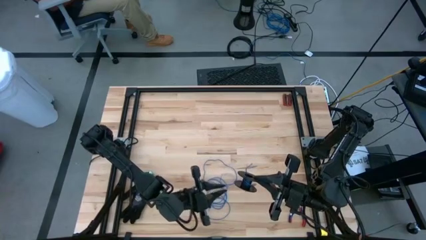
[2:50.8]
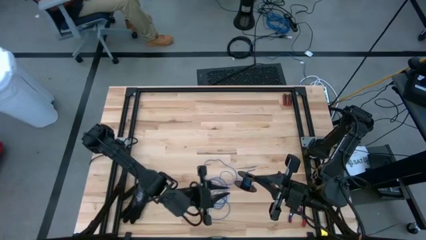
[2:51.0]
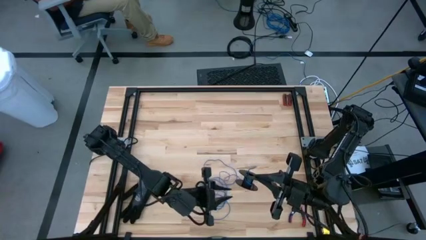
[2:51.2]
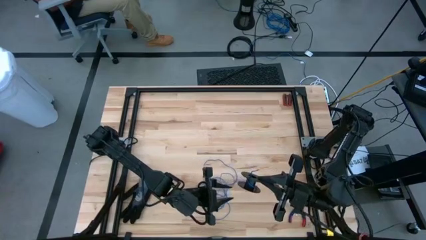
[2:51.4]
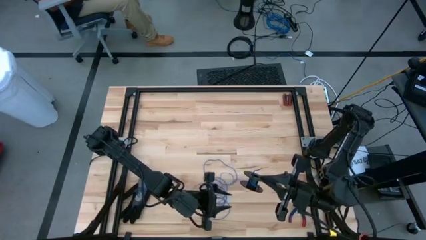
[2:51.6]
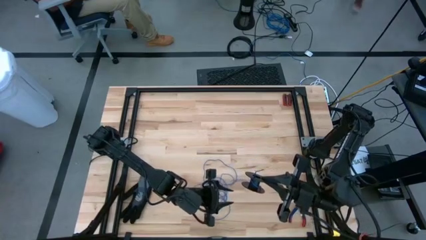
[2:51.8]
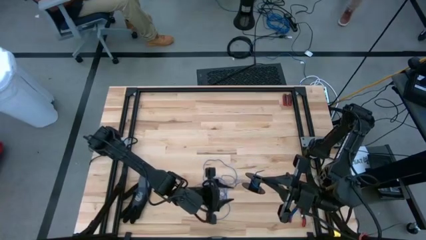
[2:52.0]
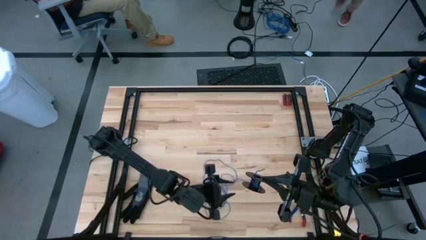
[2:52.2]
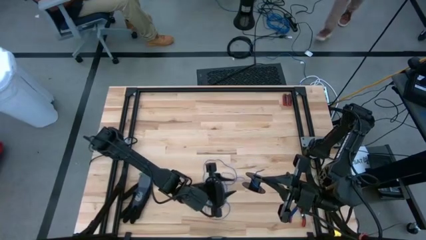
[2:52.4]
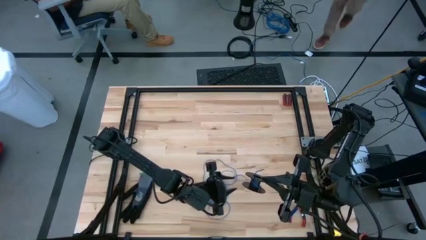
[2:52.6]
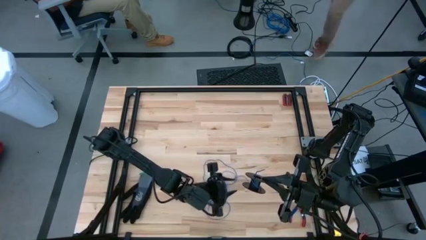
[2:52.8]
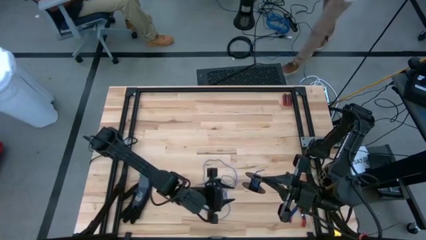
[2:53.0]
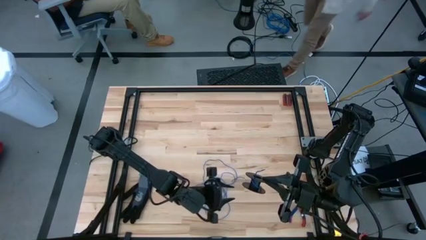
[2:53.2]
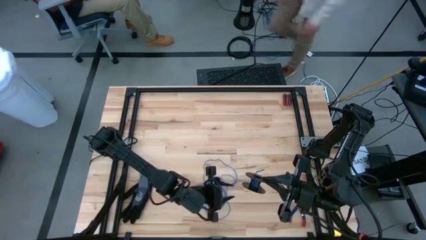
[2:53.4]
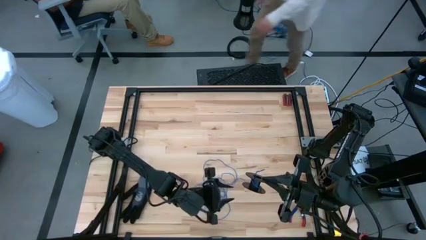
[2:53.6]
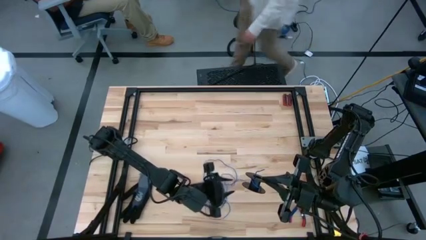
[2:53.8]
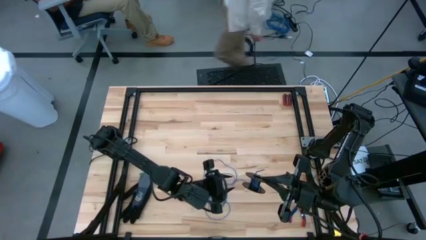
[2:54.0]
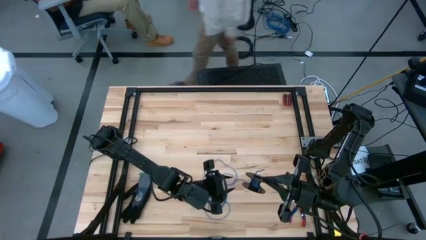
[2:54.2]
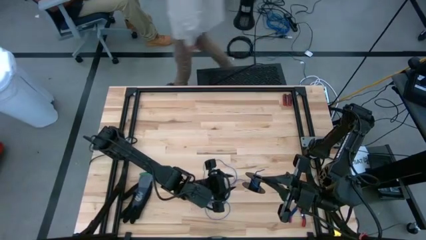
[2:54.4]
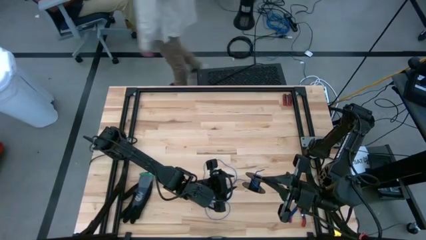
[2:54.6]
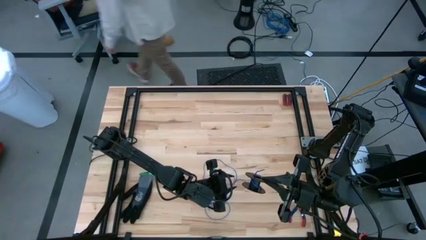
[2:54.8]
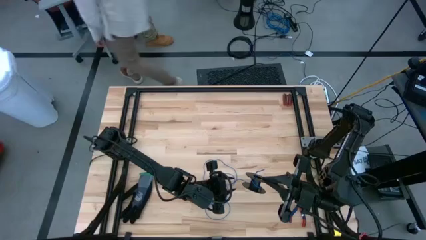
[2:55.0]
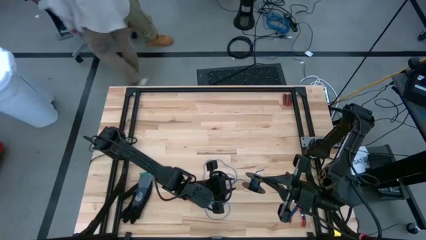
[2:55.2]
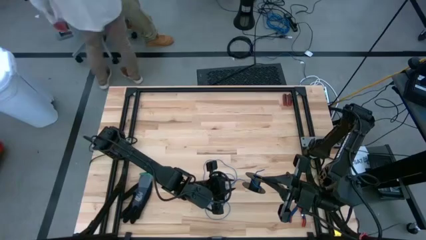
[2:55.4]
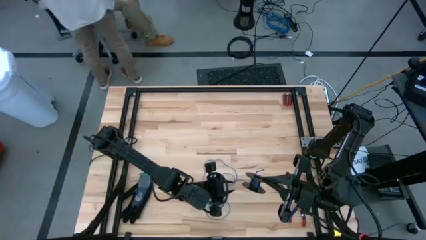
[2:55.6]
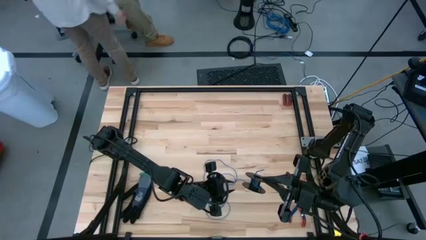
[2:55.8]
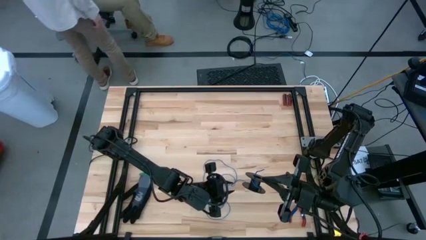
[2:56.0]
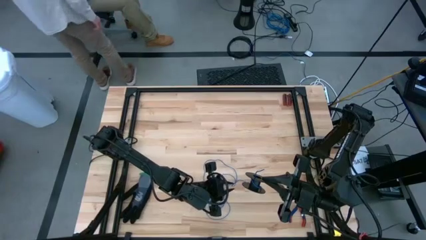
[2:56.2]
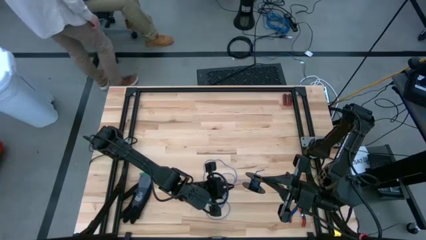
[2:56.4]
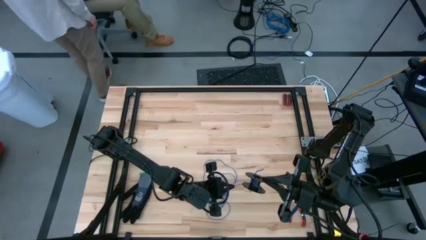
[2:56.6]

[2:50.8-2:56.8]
Task: Coil cords
Coil the blue wire onto the spool

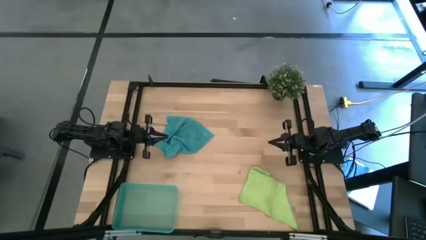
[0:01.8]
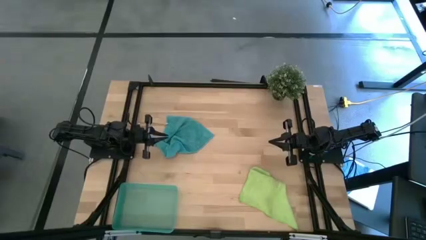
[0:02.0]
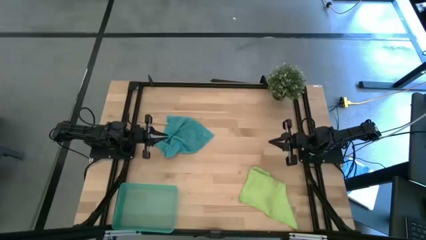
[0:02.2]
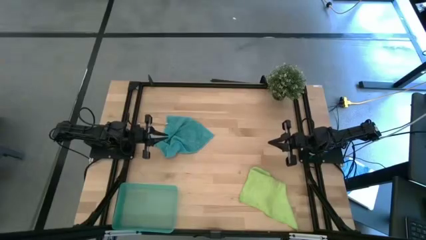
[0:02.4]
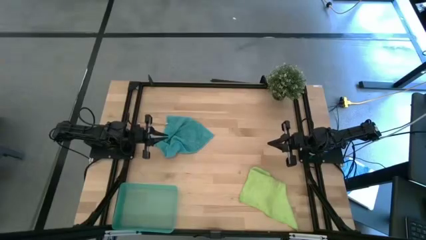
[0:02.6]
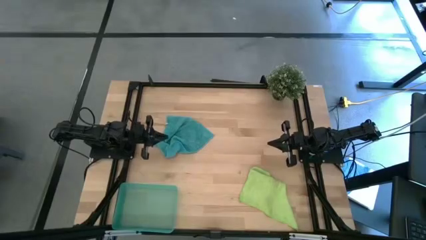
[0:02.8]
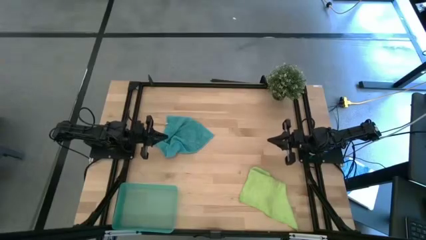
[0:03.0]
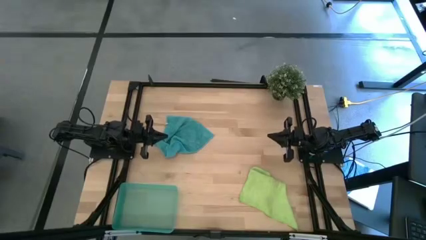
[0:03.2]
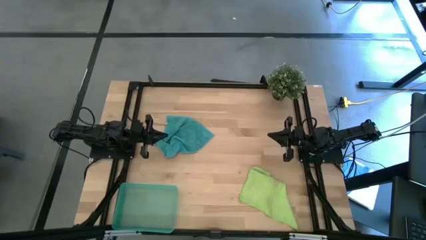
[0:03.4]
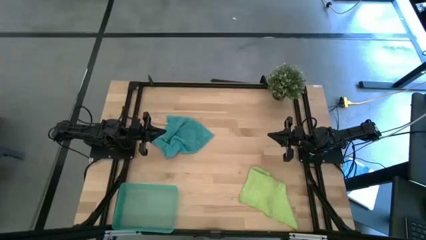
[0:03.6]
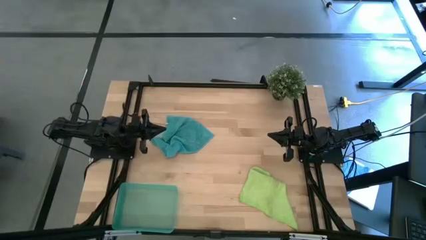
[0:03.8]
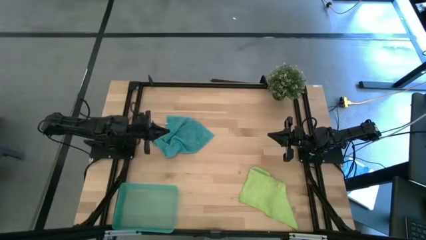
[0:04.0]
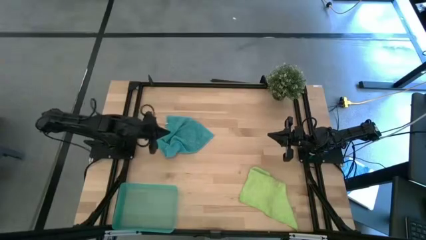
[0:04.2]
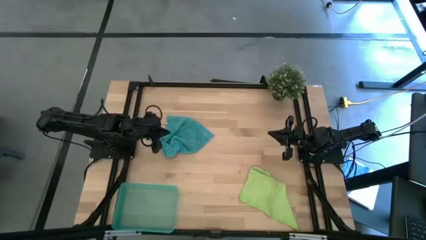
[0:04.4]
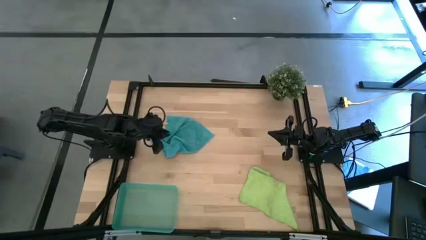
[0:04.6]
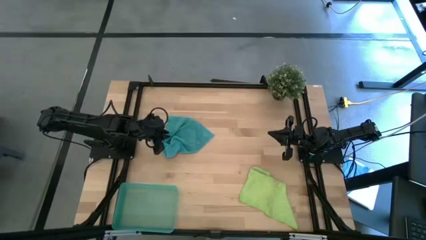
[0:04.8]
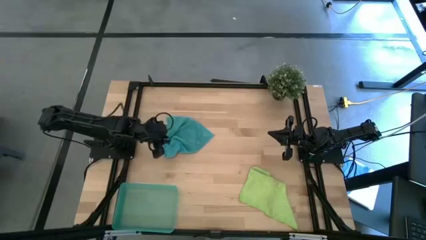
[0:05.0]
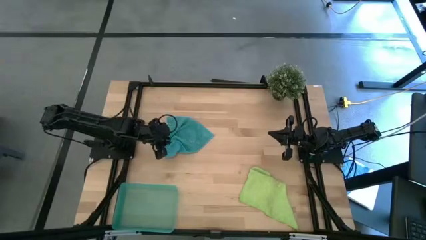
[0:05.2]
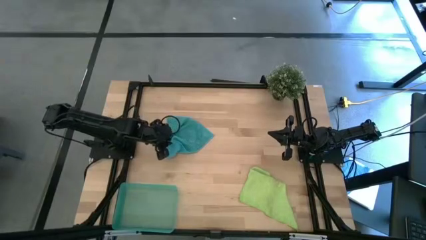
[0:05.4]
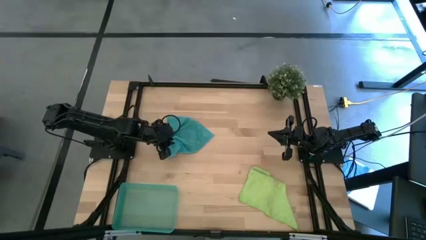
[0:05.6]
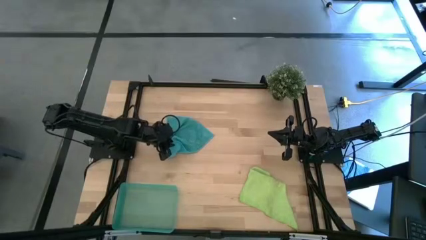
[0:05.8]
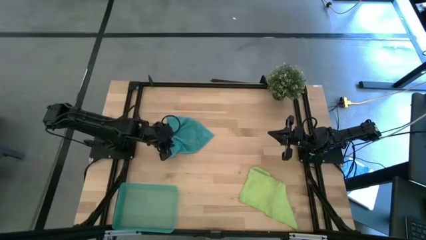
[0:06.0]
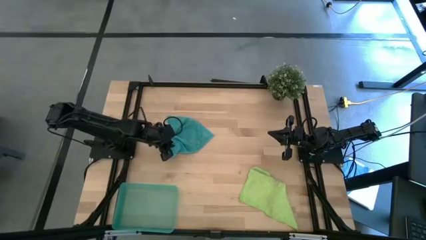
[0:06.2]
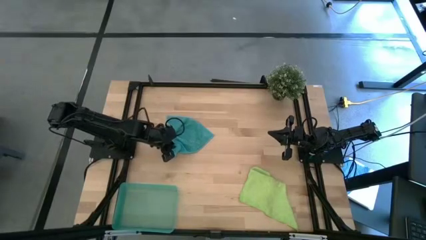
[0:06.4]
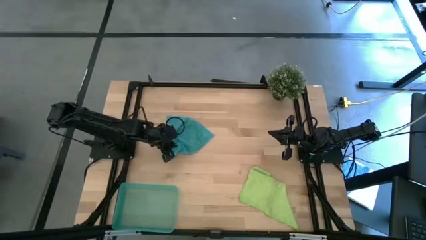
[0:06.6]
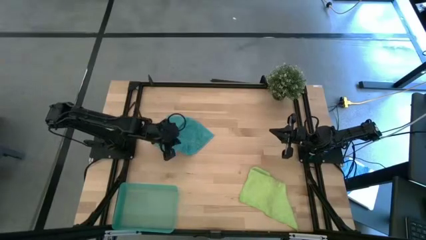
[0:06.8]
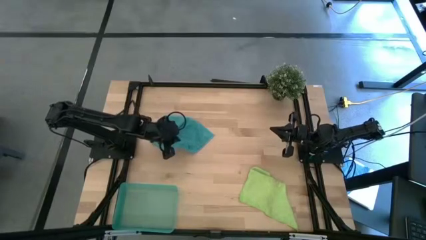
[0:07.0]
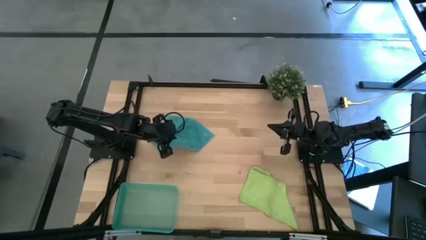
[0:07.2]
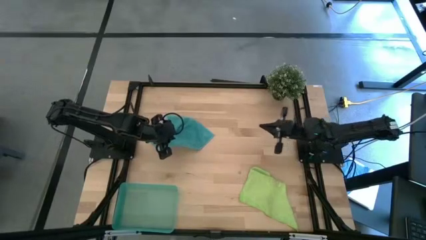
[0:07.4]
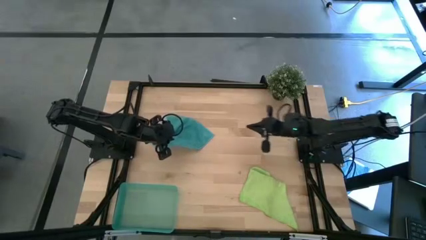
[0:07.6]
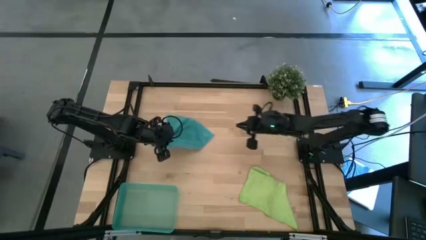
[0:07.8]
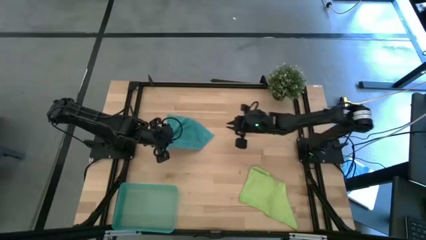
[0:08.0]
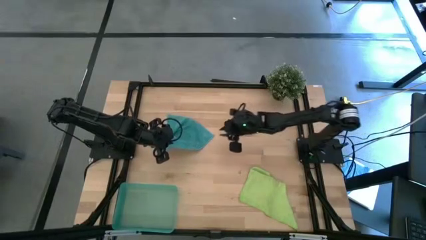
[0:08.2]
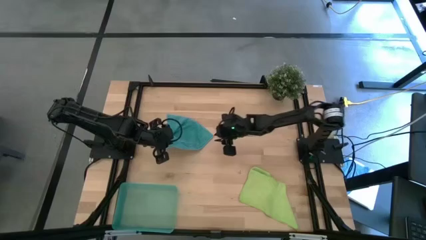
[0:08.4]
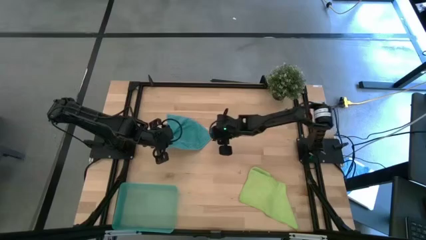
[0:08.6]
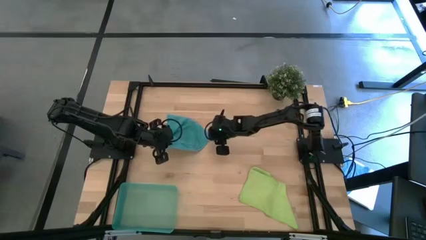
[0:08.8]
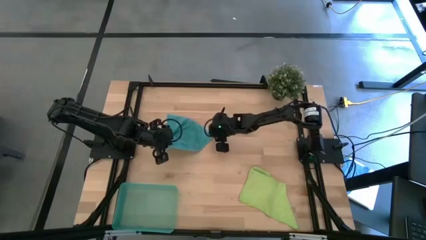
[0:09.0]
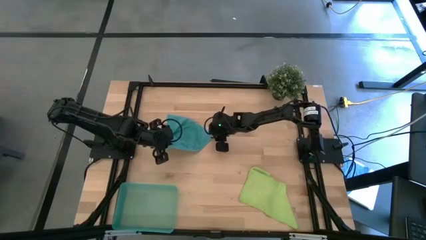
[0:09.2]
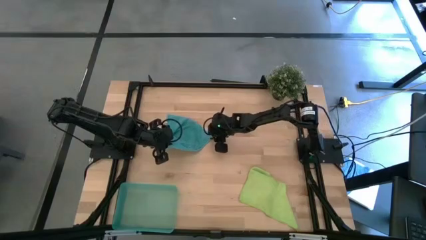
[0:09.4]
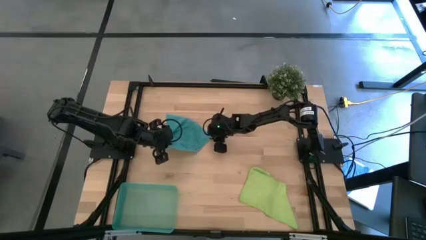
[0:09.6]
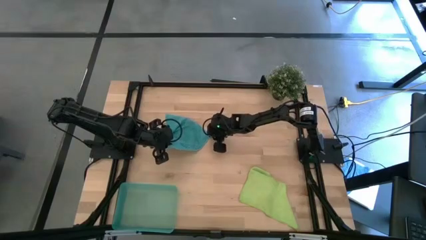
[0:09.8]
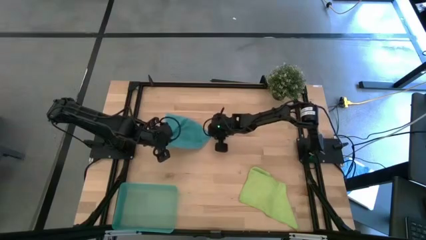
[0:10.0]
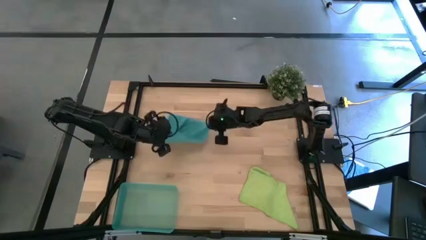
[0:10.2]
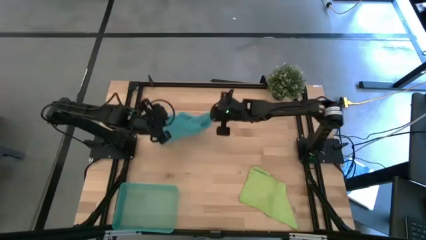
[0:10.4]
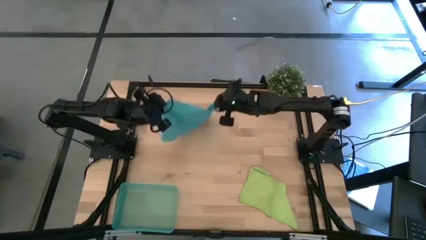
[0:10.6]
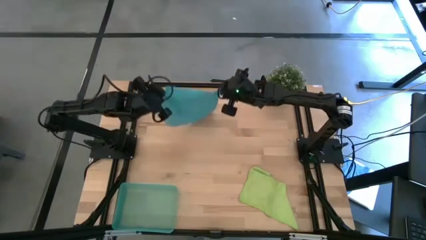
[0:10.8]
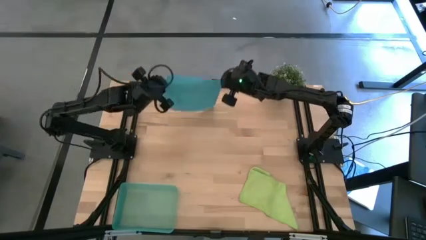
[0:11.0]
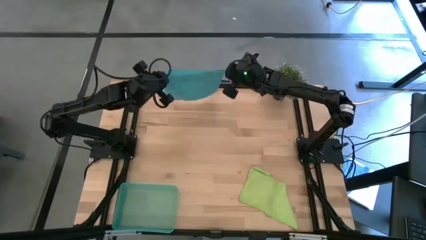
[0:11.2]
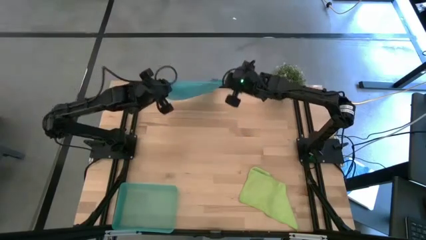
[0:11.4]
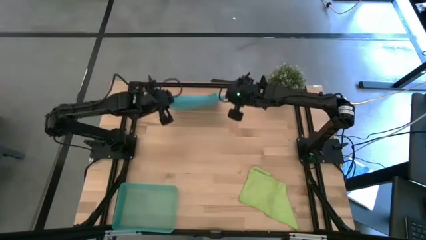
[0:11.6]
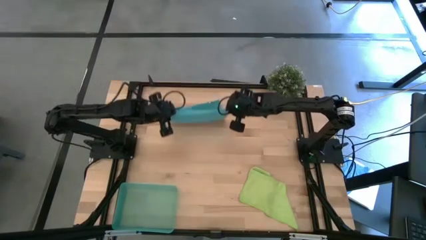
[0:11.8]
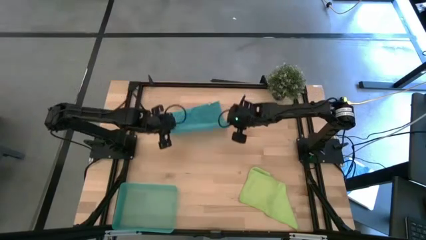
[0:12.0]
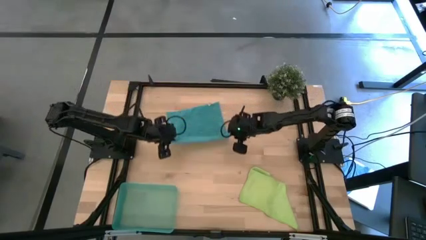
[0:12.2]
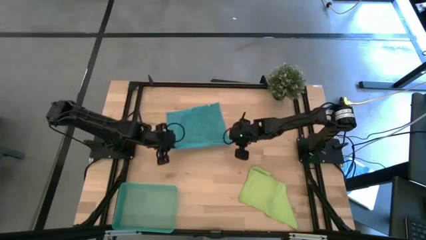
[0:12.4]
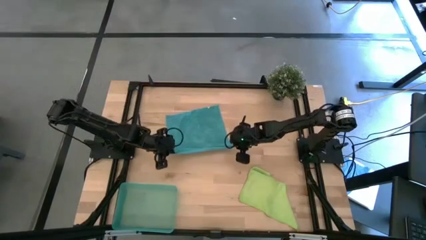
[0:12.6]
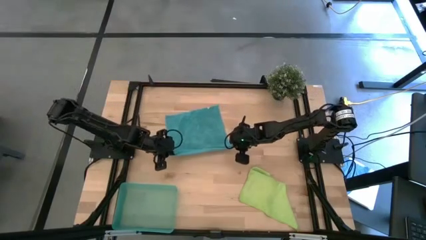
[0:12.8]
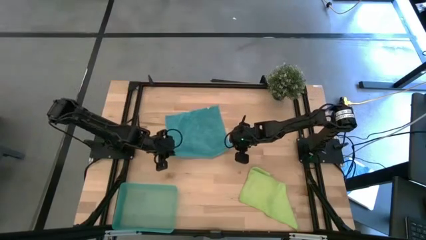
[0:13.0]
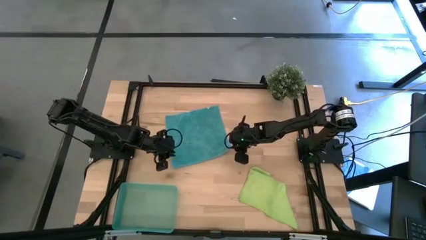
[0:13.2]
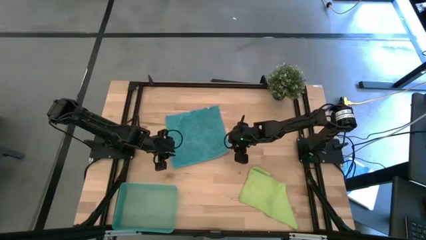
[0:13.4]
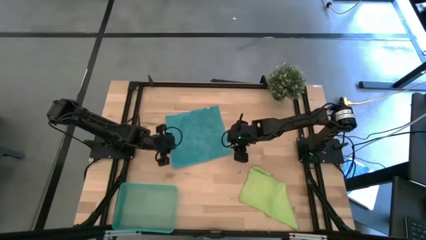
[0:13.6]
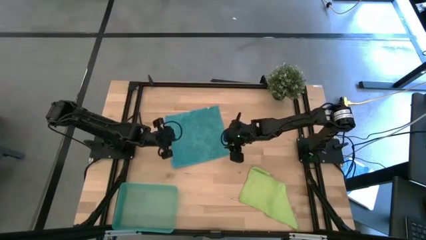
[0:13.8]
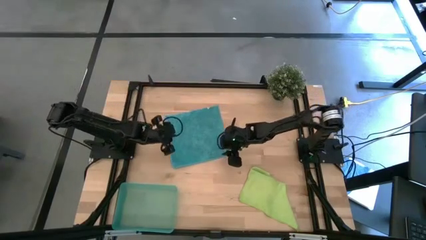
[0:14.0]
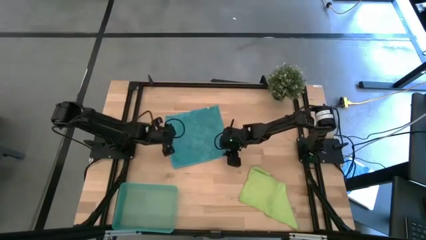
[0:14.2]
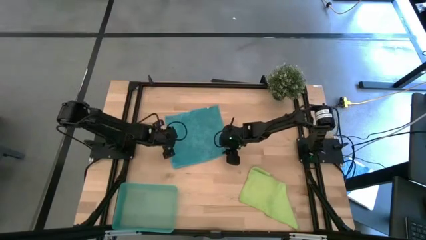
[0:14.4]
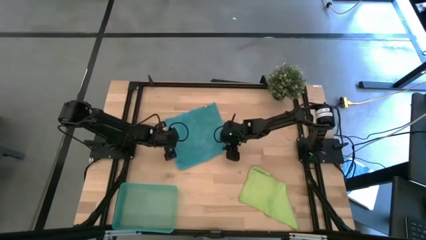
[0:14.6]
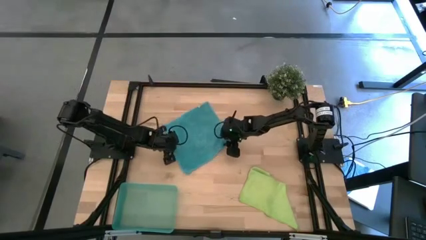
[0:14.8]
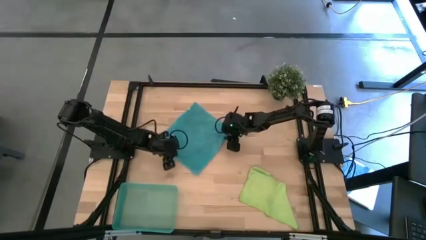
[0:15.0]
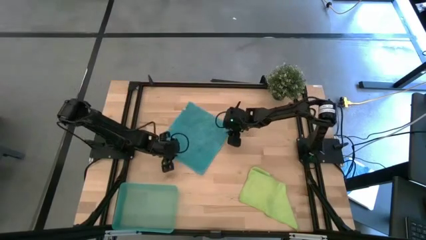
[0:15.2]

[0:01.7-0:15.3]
Task: Roll microfiber towels into tight, uniform cylinder then place into a basket
Fold the blue microfiber towel
